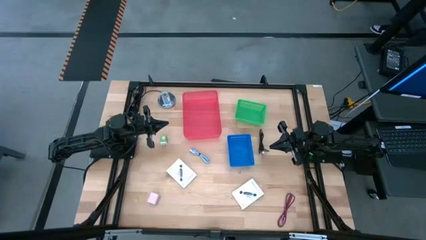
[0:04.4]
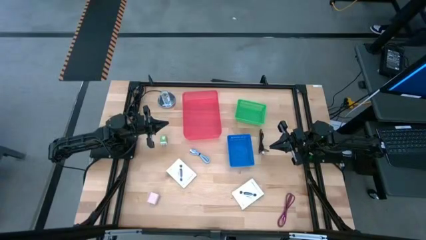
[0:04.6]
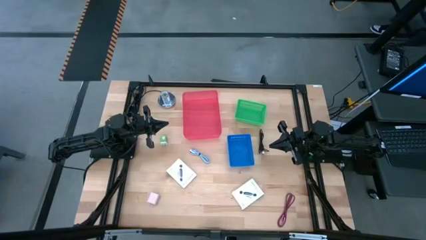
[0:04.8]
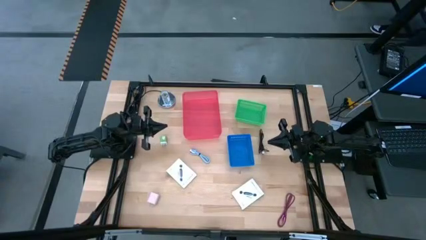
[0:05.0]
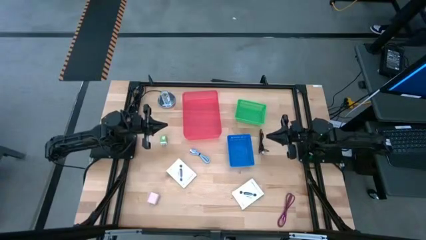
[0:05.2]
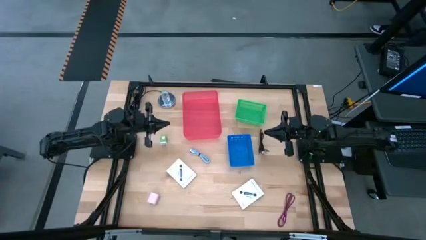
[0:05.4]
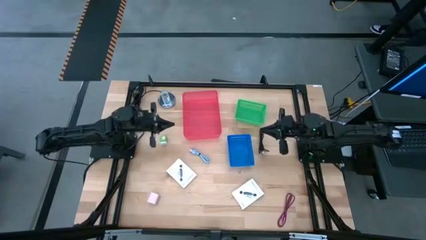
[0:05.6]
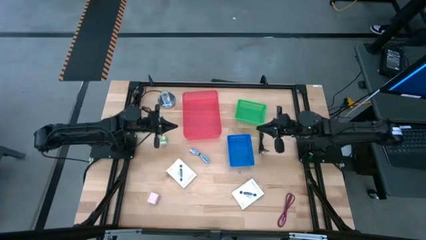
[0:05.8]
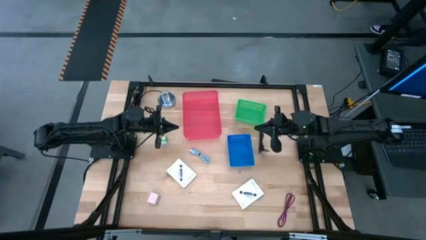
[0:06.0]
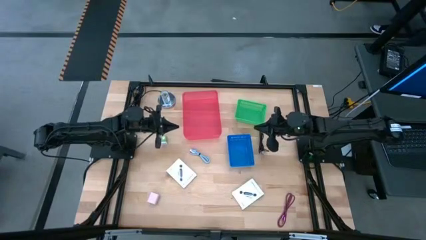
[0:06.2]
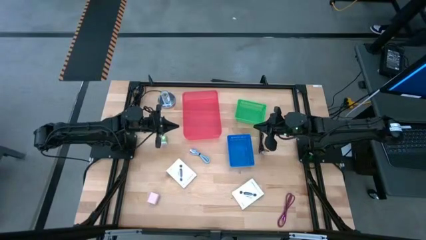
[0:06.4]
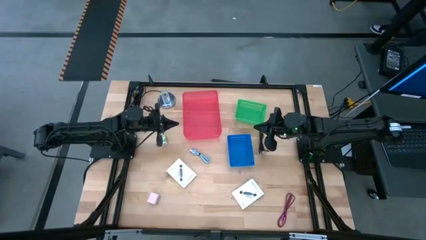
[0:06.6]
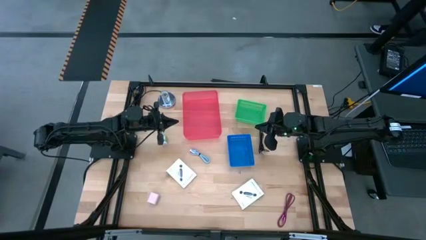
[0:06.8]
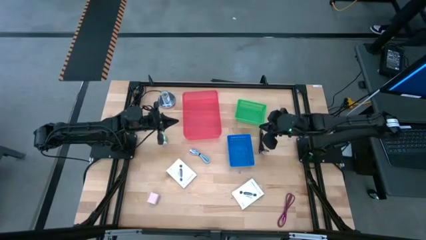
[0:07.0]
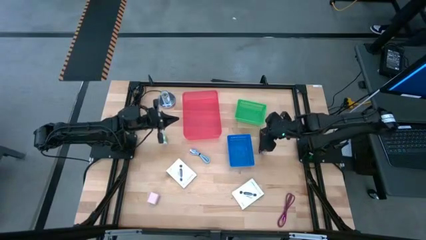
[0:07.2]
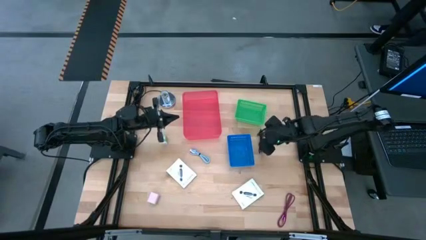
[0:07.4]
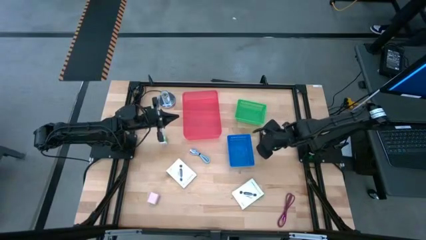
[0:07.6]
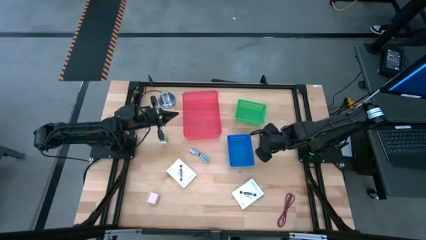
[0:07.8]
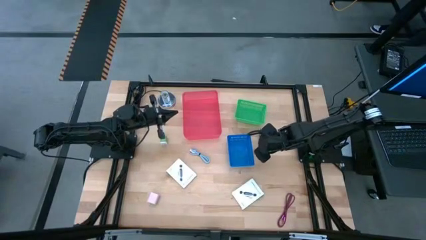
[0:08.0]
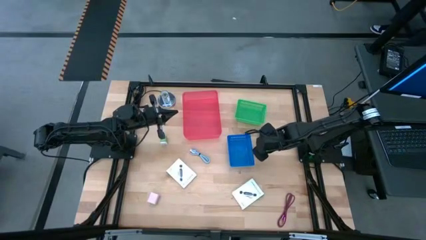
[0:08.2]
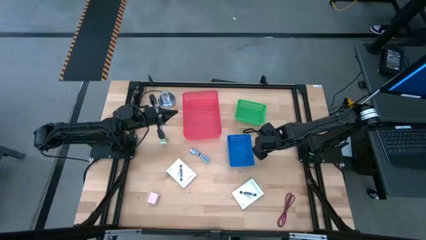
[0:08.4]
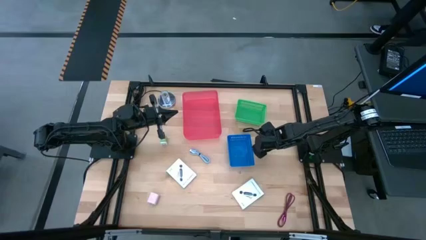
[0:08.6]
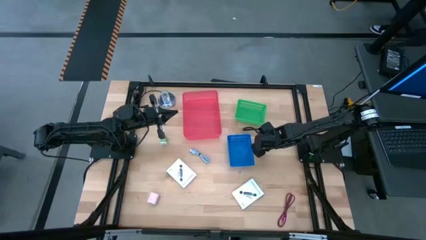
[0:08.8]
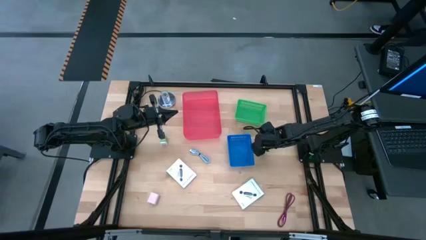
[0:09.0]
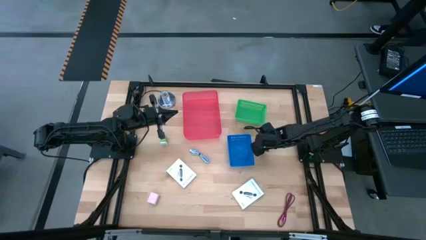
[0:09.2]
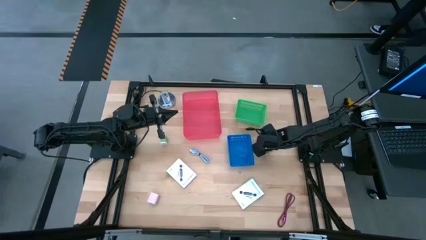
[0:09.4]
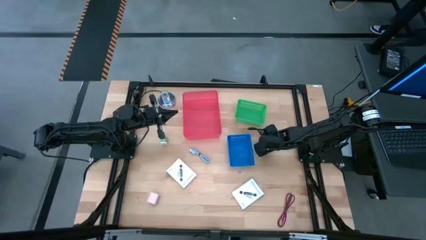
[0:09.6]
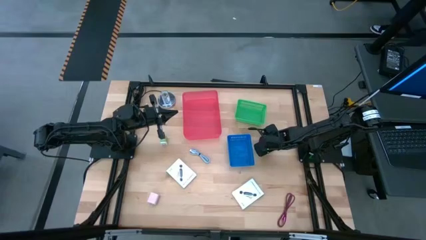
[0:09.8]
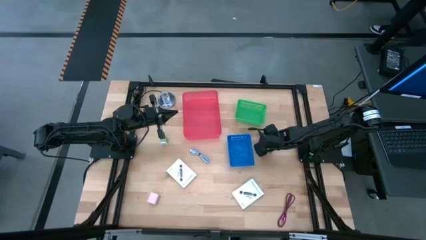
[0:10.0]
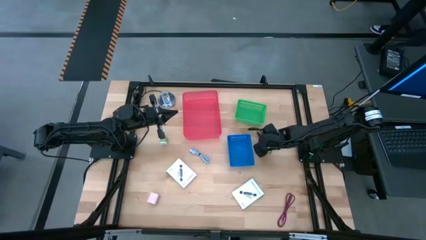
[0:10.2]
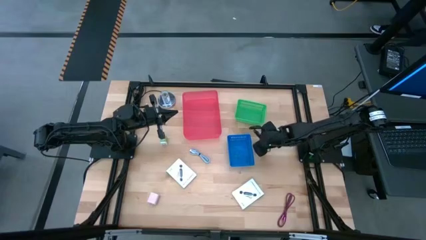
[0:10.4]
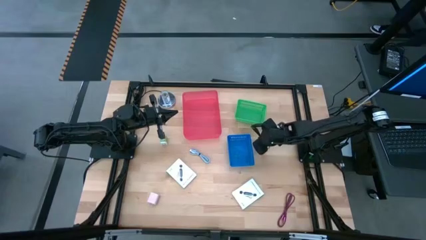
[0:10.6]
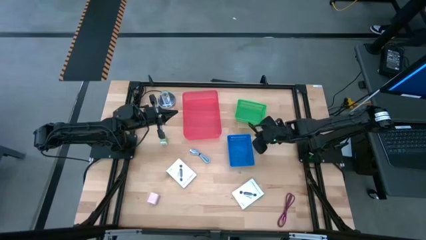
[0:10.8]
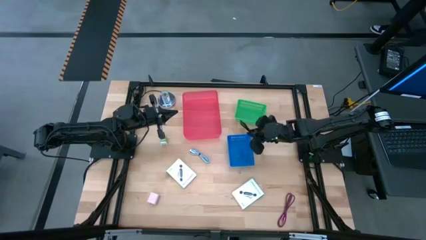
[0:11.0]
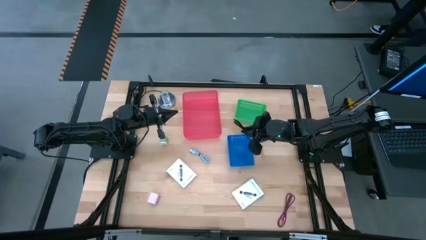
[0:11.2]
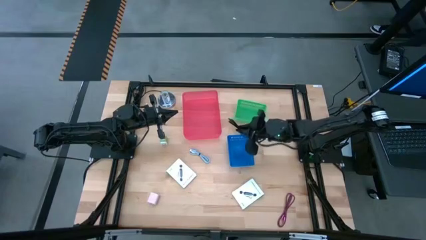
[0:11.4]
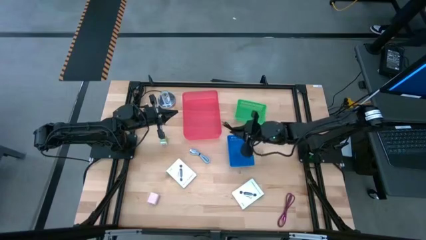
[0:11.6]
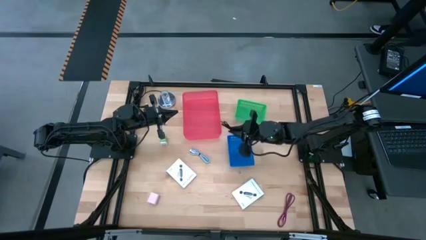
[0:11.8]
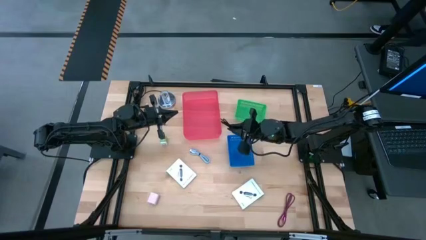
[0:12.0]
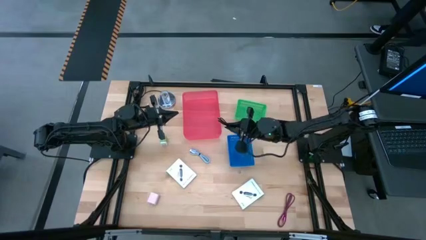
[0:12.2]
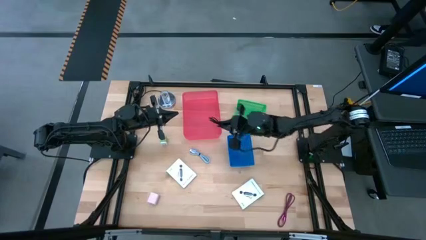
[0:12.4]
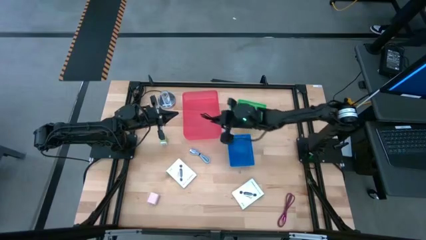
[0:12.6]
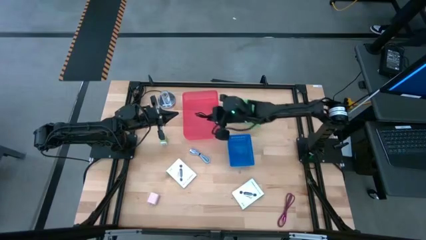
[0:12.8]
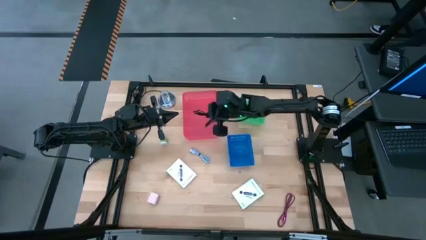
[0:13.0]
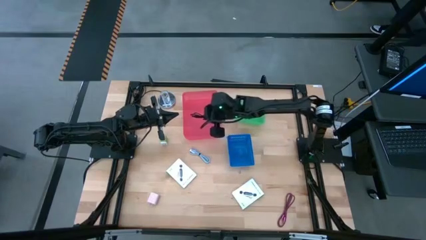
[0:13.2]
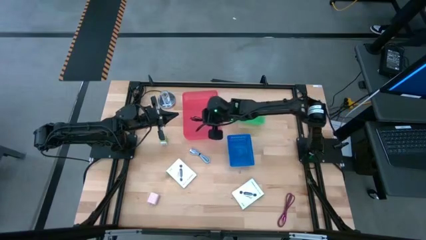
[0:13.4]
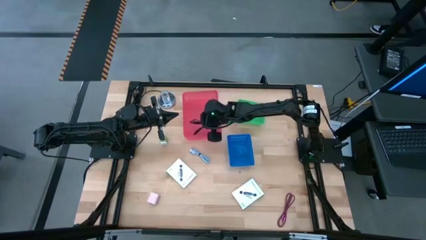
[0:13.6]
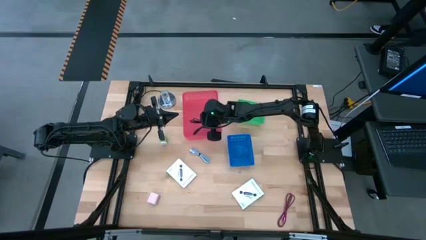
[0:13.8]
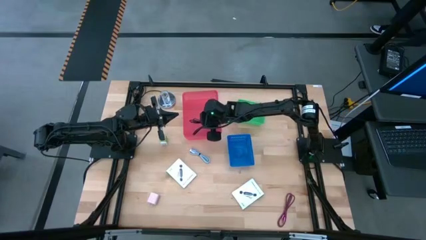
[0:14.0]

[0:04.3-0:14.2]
Task: Pick and place items into bin
Put the black charger cable into the pink bin

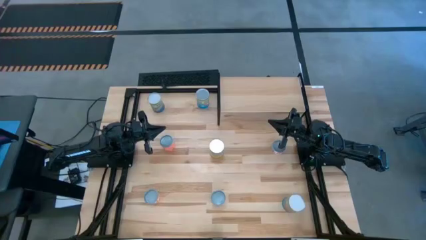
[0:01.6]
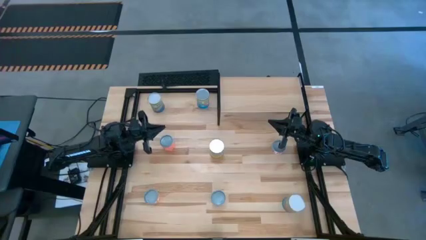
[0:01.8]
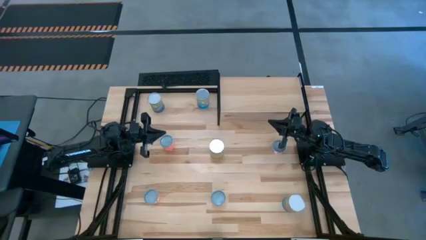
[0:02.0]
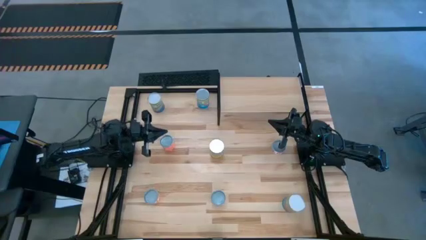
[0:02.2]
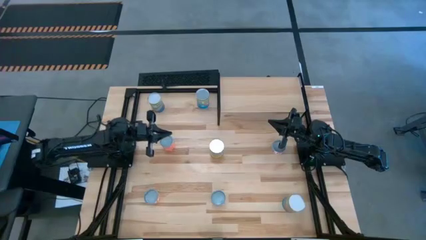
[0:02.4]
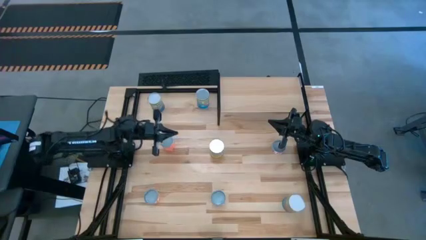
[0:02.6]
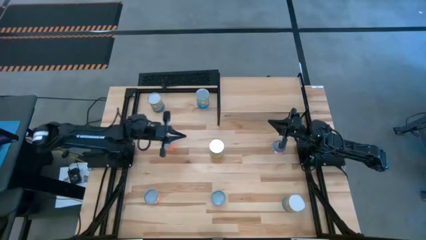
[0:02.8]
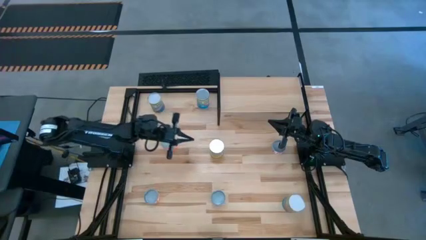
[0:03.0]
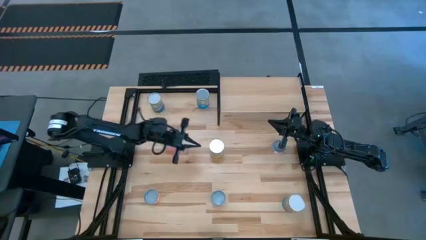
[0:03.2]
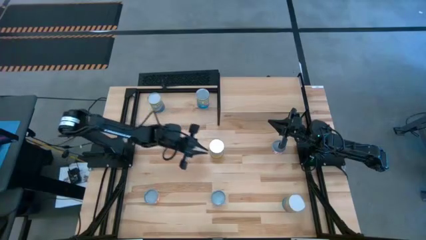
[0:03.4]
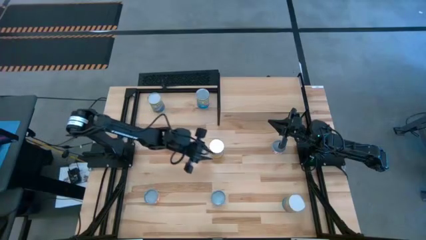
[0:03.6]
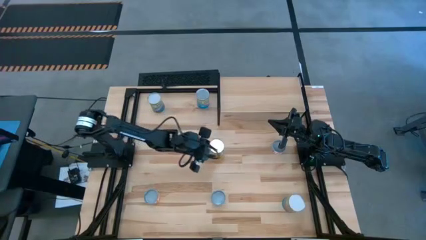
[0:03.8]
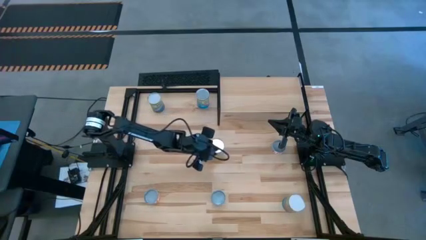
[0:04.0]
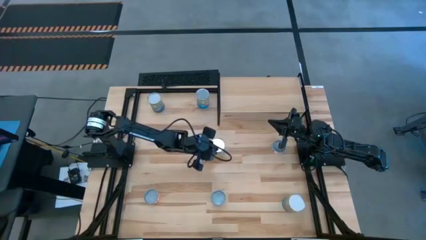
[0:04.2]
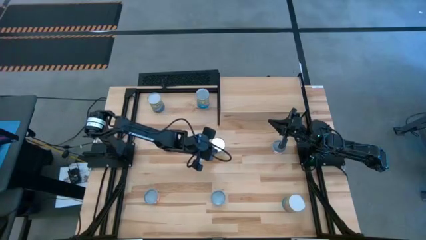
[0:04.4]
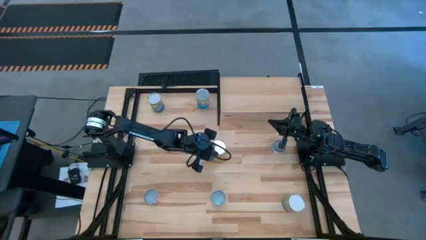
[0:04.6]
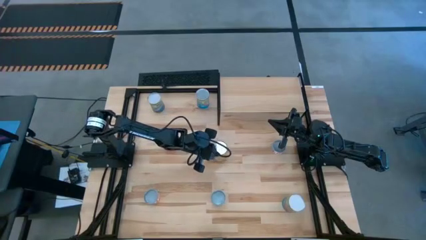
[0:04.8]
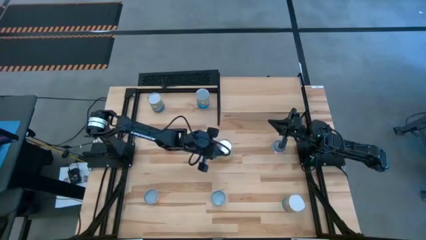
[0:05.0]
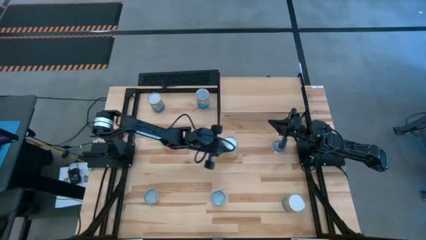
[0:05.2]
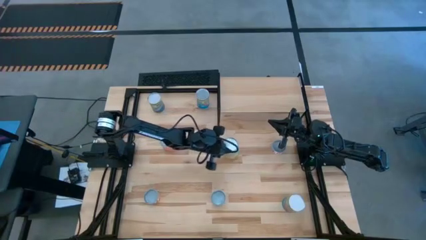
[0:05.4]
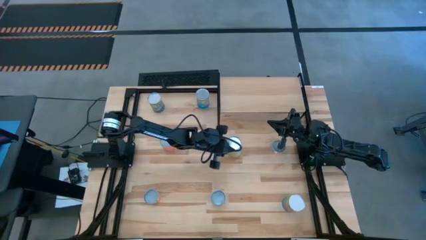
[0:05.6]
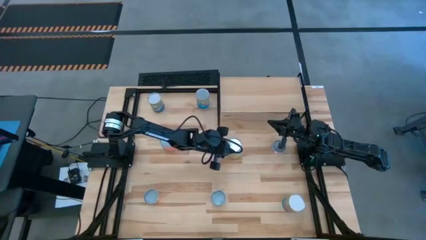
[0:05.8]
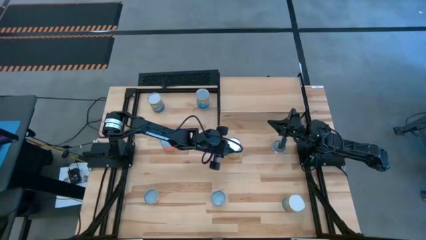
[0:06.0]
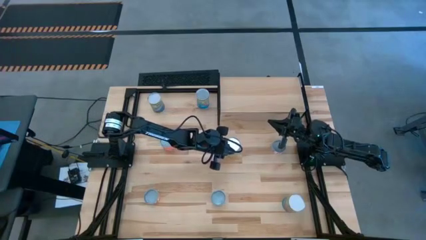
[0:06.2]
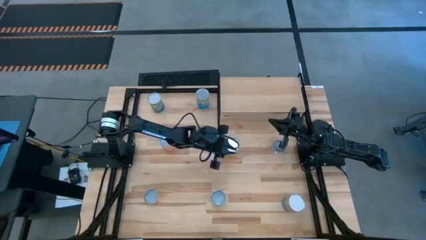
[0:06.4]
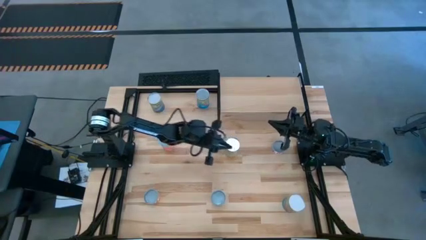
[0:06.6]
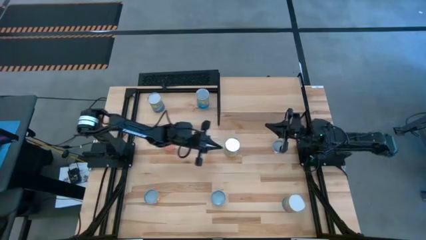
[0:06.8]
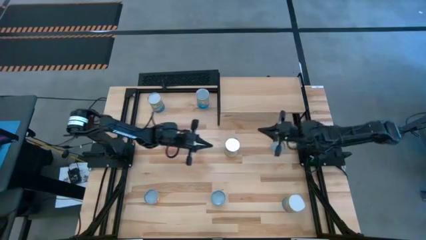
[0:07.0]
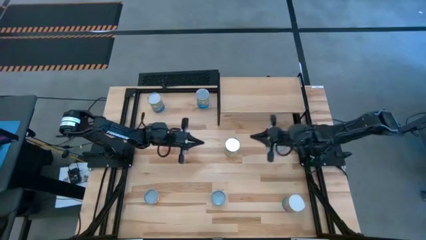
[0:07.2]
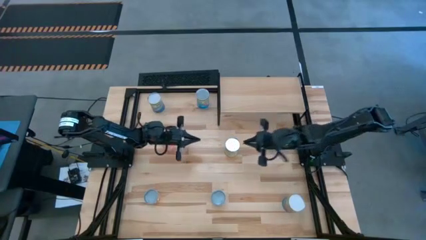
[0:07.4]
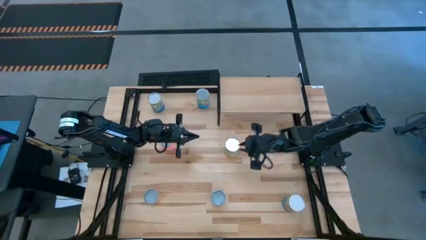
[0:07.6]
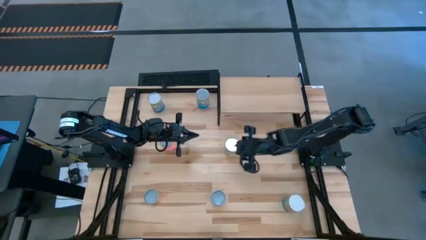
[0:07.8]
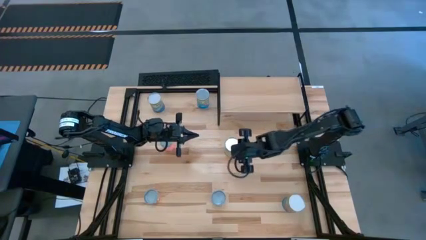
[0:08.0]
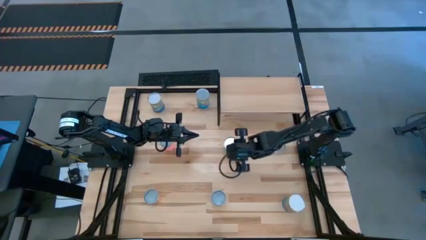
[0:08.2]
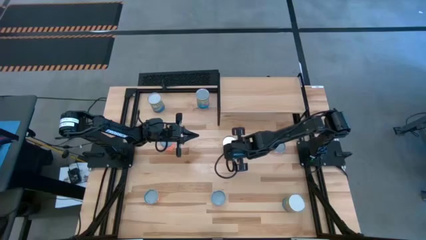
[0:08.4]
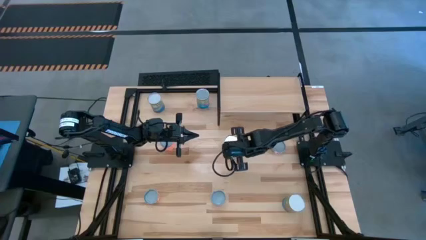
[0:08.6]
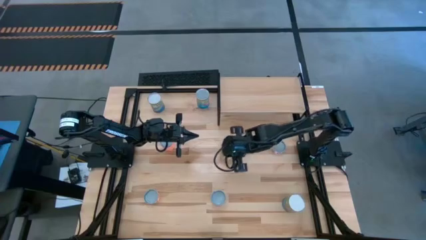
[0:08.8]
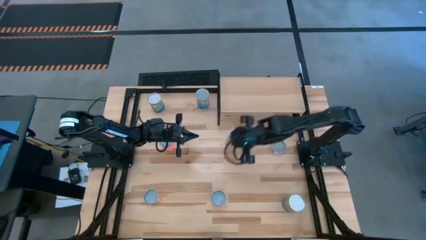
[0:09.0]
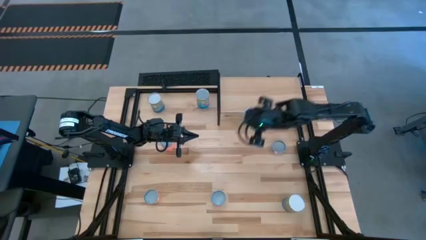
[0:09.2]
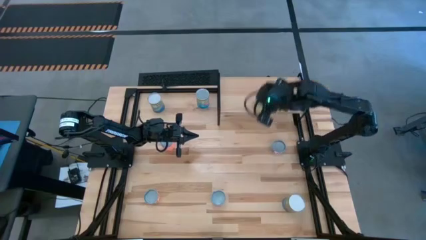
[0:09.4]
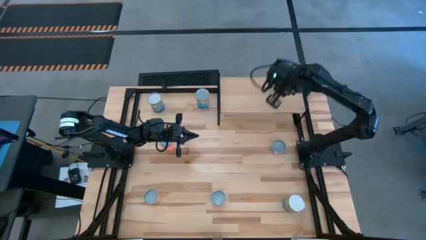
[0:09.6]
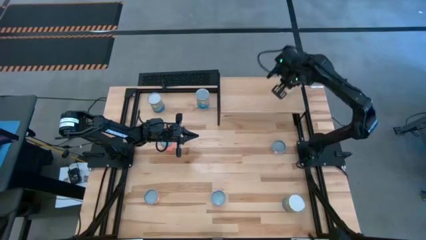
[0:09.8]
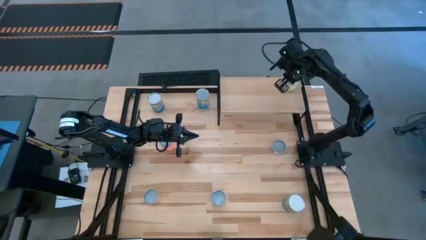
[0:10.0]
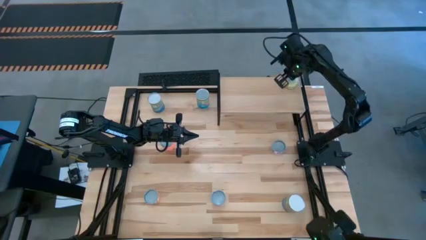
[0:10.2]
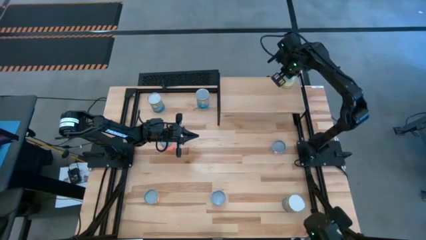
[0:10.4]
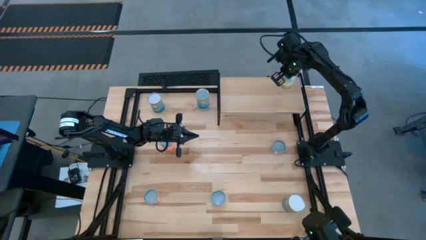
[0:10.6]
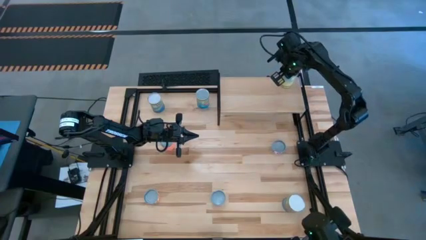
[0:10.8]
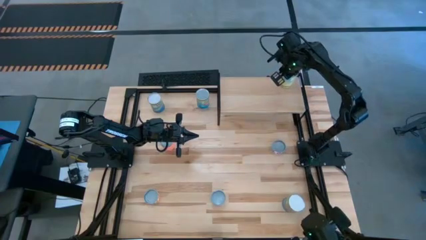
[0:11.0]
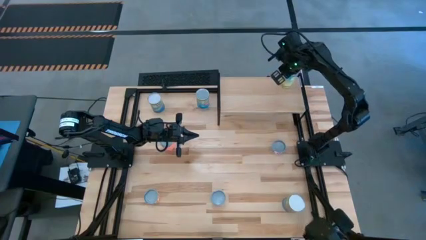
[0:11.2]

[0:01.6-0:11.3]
Task: Pick and place cans onto a shelf
Put the canned carrots on the shelf
